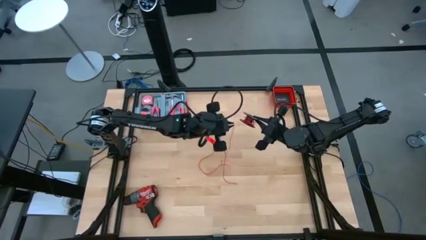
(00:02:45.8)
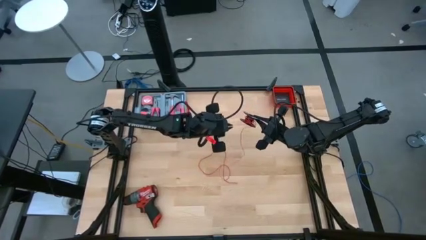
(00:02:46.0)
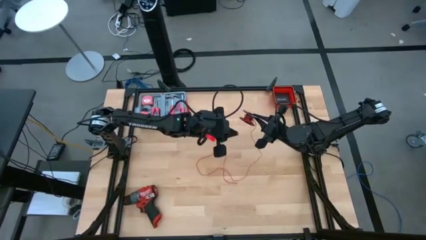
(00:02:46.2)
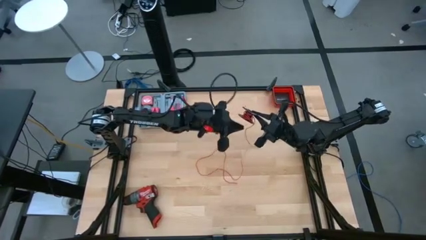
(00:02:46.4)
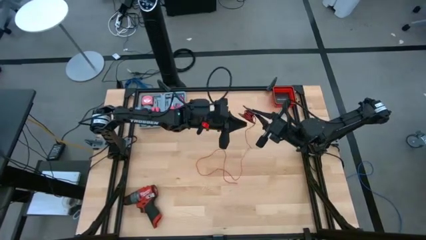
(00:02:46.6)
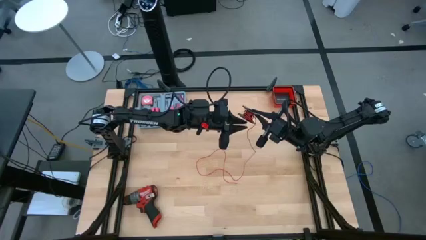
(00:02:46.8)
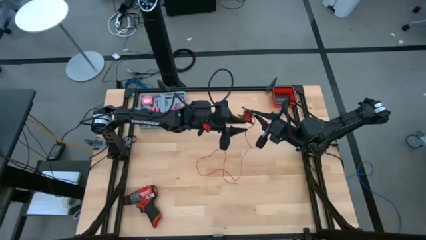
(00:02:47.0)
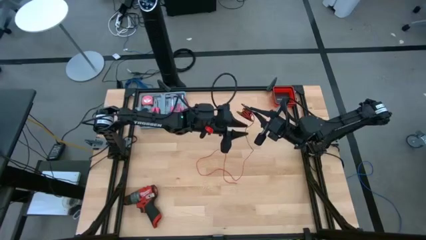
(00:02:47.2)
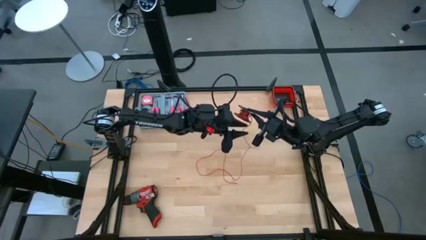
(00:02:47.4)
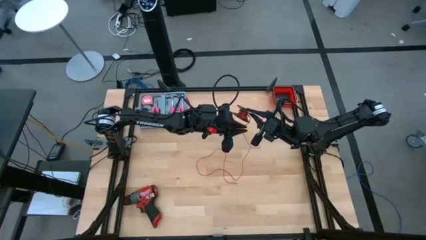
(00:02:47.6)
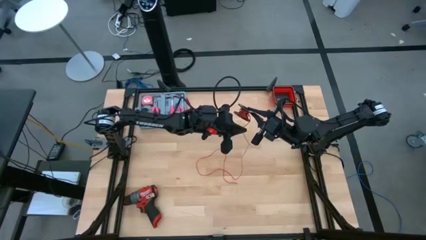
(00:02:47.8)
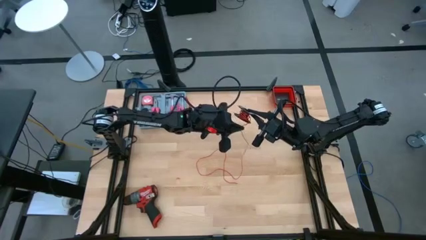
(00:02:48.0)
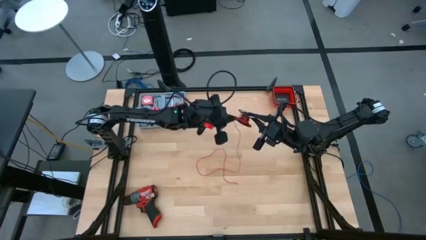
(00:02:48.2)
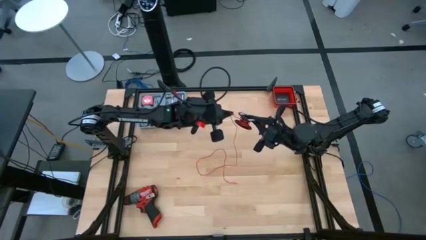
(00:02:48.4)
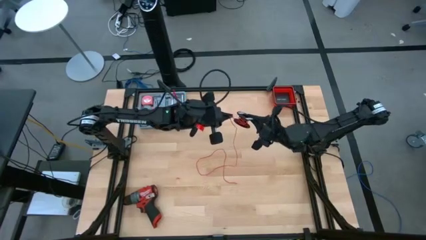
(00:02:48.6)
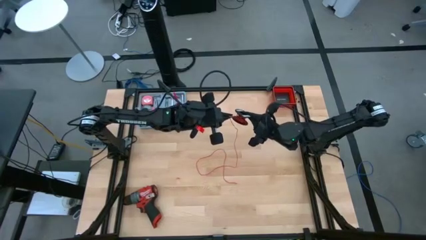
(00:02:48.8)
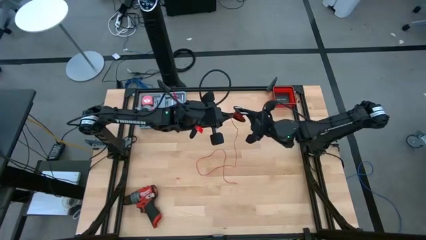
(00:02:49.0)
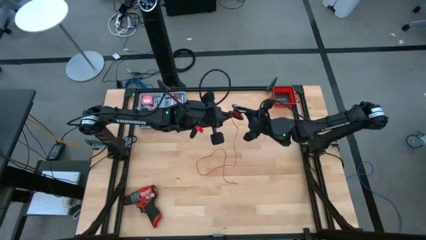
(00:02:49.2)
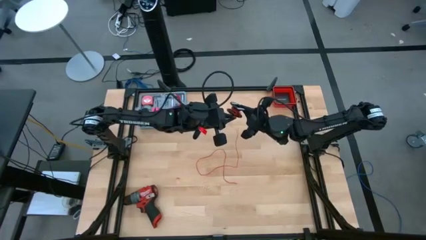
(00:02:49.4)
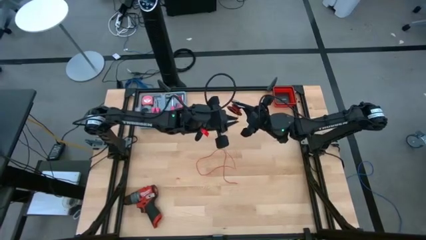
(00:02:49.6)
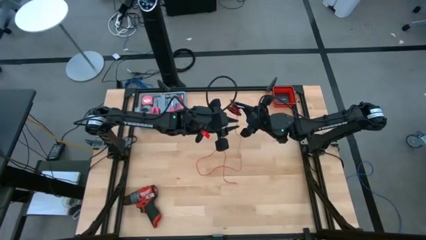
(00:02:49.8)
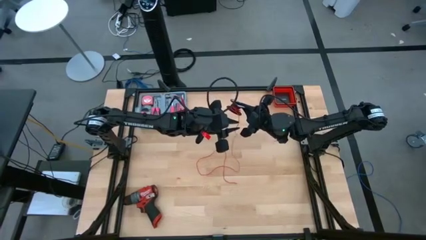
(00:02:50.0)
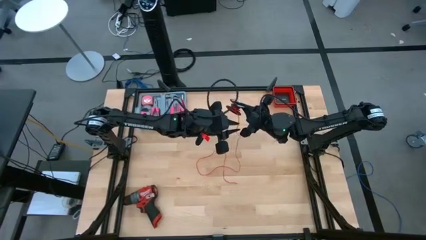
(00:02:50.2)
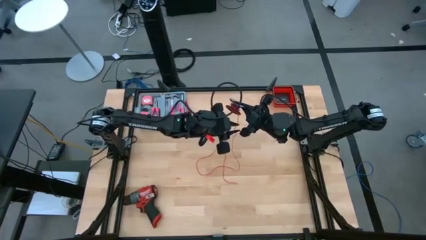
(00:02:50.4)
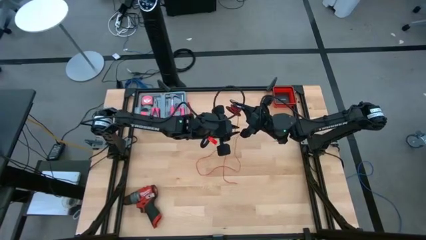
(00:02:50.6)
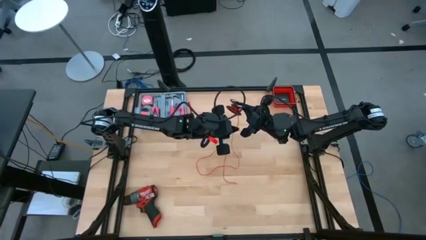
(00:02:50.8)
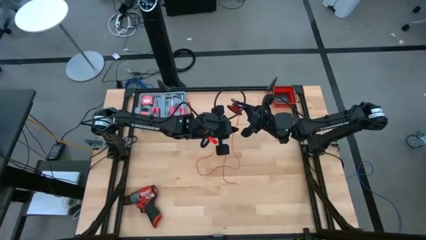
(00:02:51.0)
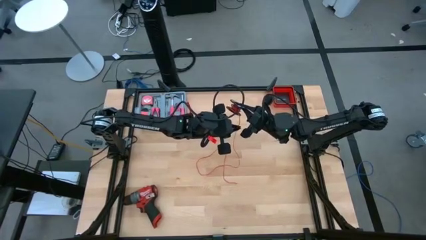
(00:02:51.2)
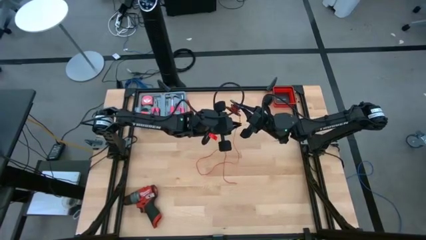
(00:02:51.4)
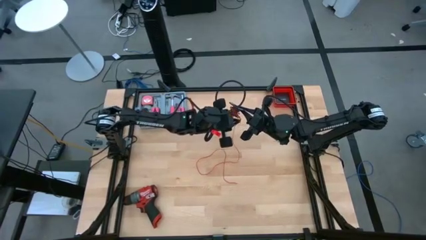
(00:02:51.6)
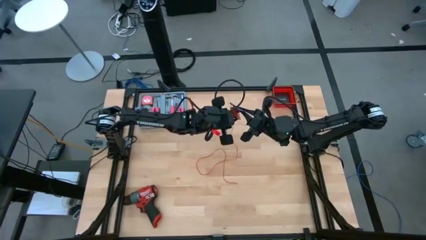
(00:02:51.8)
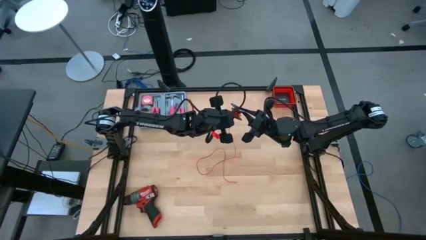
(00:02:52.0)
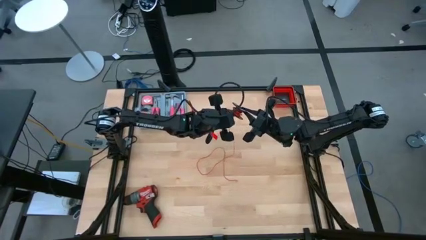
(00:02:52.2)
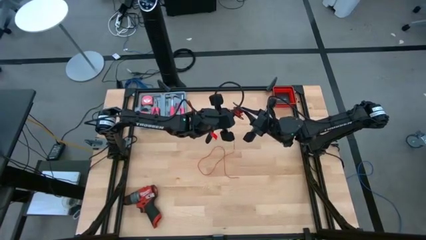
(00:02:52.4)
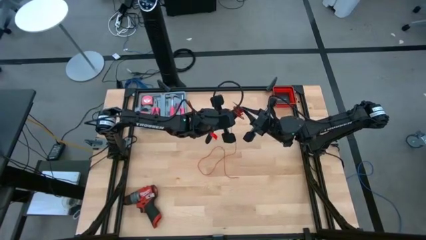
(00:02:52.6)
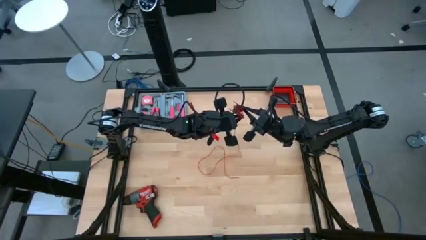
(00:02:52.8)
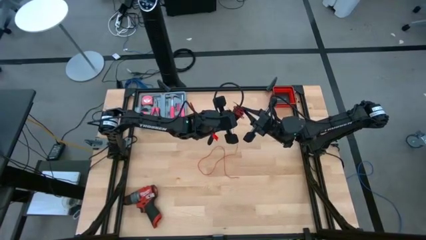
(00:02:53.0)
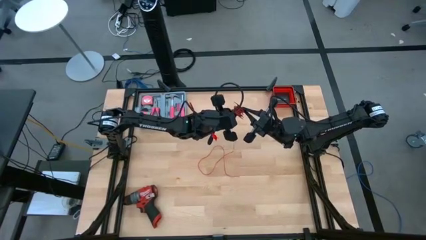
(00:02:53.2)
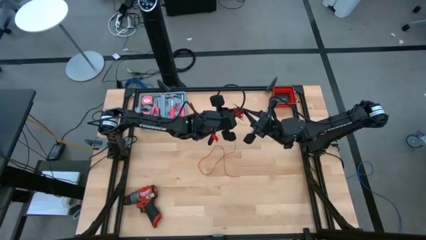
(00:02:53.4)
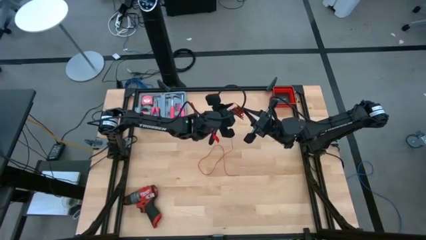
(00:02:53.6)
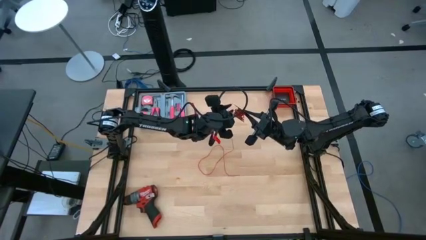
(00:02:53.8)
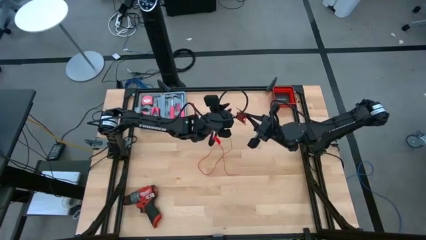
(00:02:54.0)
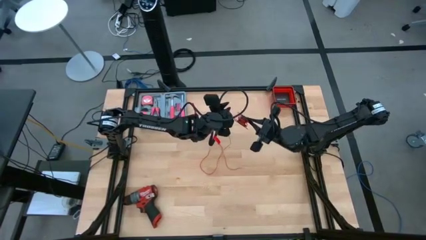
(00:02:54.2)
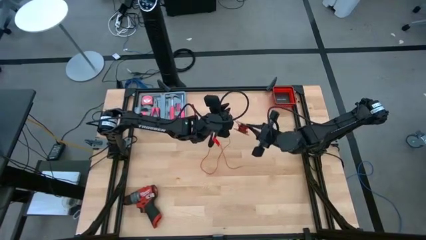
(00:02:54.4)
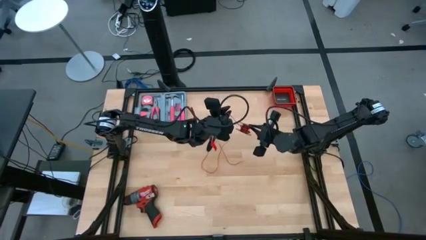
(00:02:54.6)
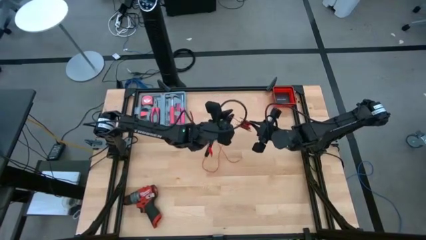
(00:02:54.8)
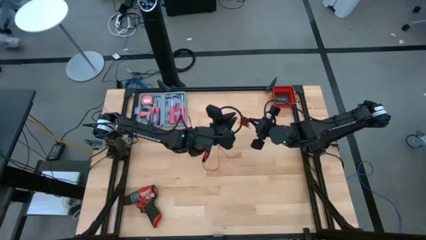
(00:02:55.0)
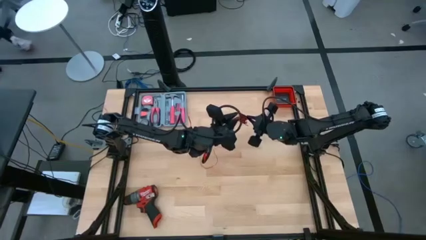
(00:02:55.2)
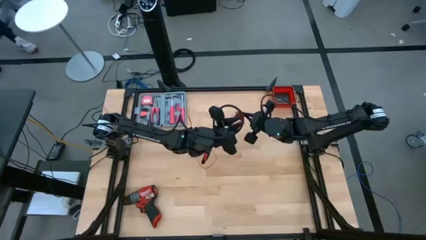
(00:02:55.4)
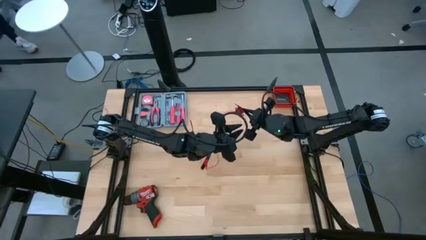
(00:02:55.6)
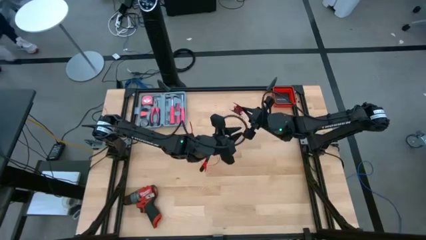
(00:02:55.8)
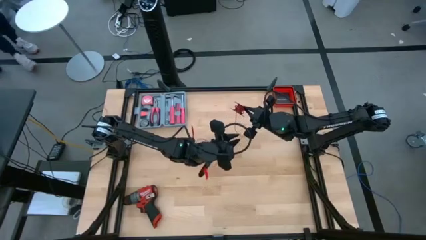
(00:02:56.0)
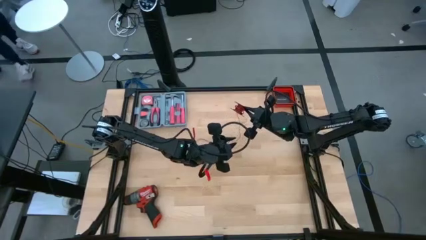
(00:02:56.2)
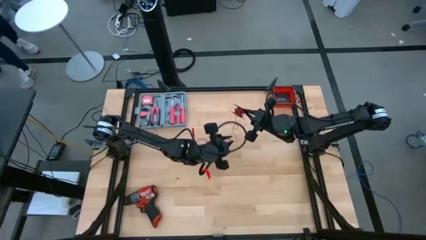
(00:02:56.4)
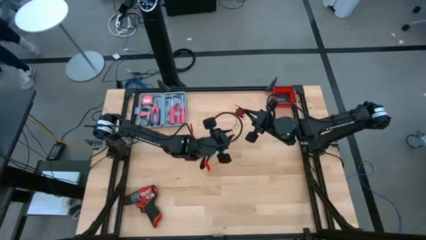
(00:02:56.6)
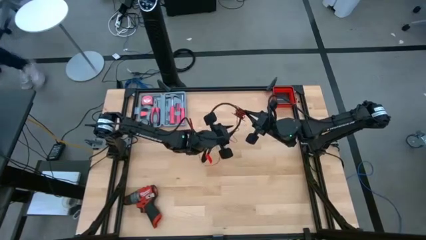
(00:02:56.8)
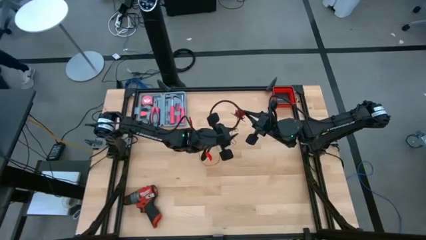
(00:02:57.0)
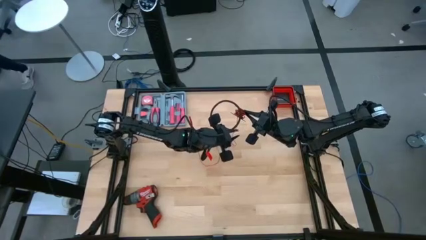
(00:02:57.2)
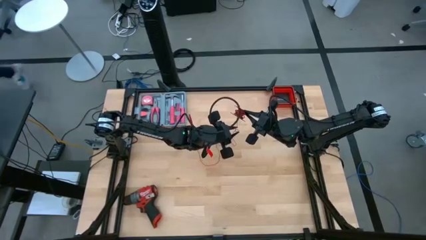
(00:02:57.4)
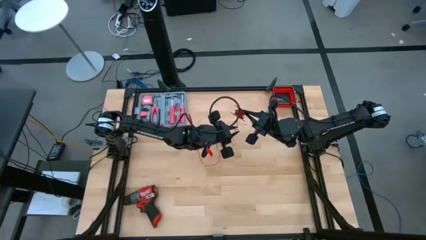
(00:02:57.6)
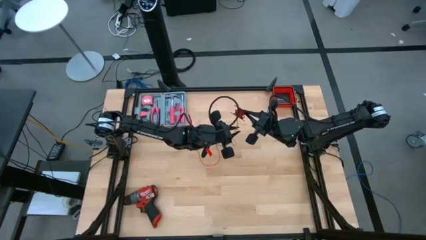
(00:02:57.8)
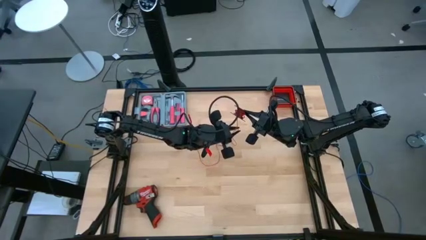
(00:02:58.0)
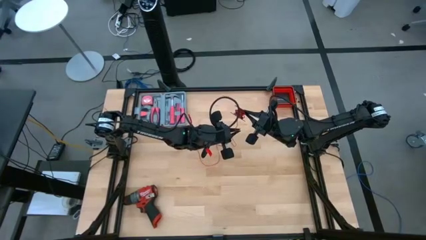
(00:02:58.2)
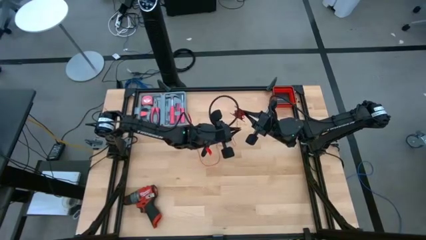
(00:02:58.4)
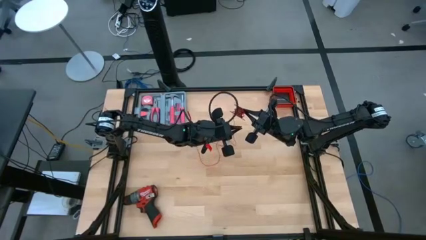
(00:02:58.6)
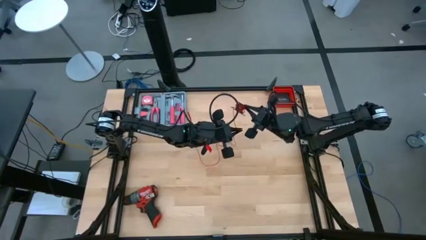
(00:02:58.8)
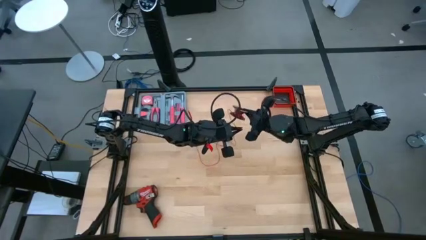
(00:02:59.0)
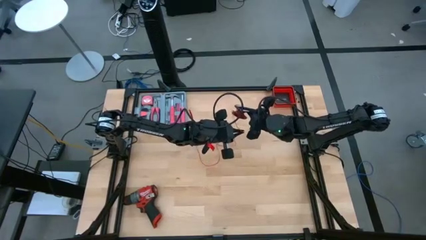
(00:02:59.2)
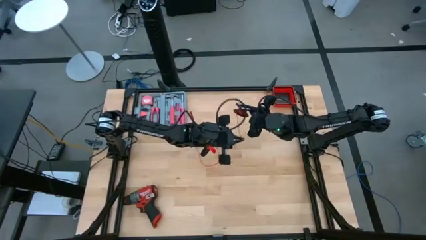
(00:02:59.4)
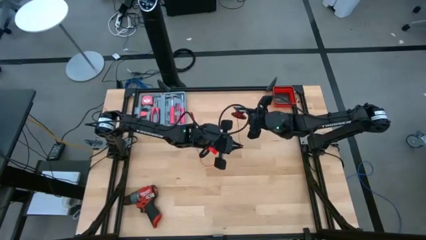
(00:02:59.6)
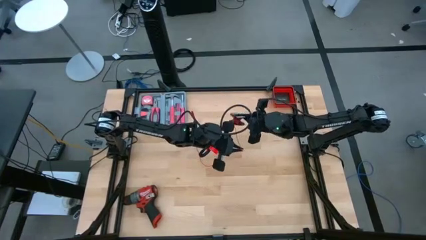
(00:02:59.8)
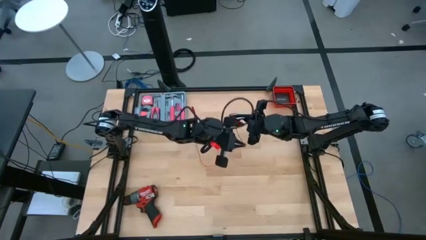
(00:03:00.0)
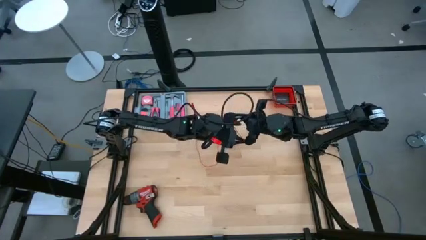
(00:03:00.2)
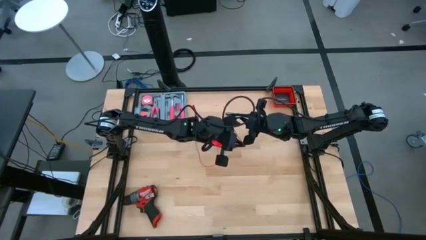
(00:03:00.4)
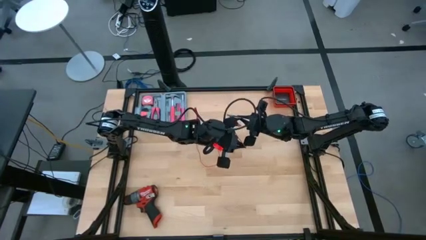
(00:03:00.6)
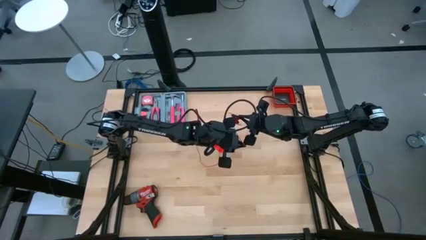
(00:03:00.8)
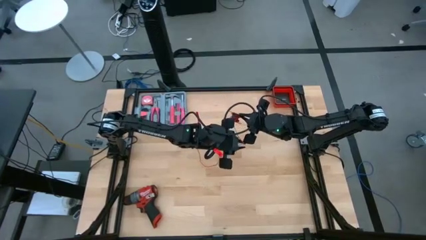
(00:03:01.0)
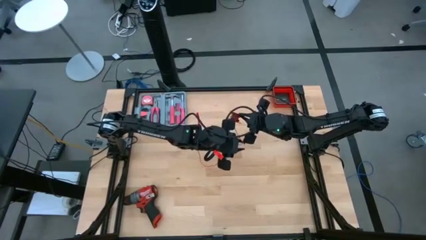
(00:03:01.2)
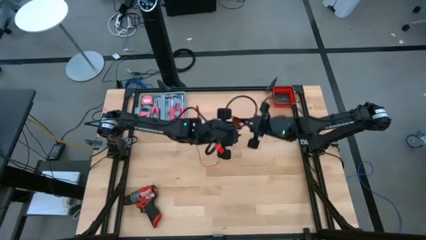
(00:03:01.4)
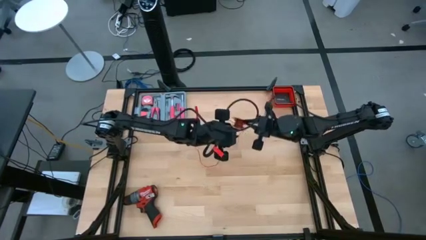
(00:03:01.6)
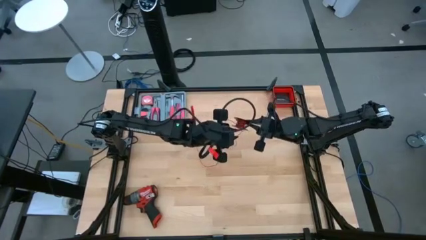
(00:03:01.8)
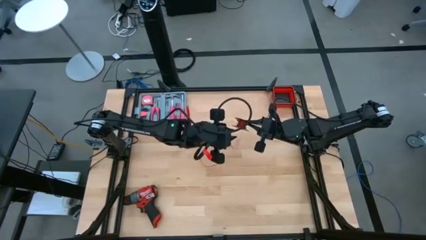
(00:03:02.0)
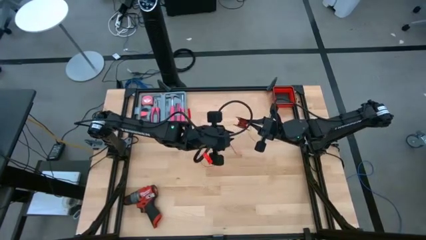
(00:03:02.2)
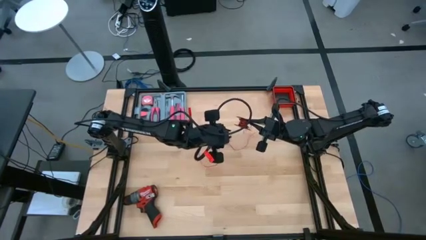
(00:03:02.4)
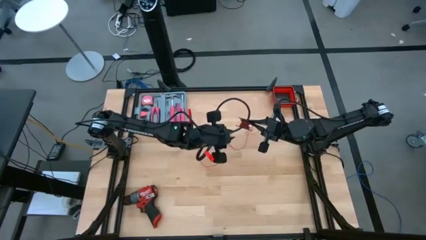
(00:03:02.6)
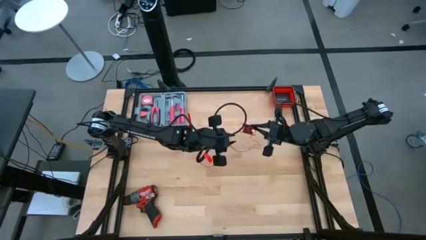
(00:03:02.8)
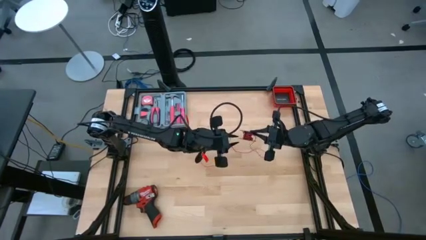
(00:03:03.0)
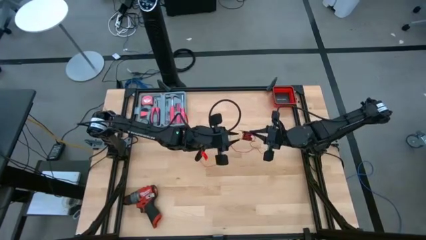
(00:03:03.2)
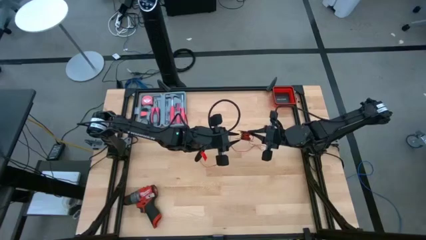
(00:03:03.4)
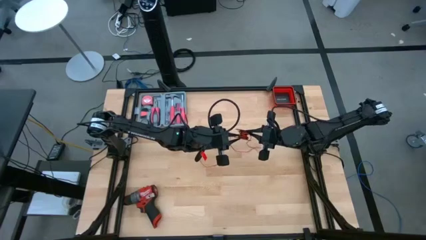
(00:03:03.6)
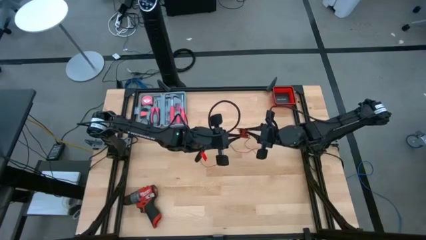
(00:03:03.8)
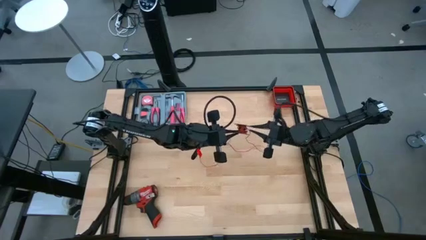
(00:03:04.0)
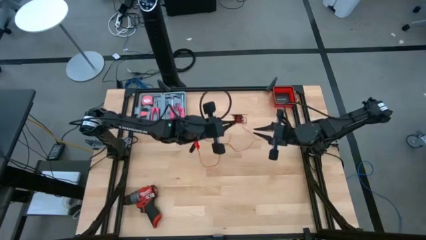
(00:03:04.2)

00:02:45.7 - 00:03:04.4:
Task: Coil cords
Coil the red wire on the black spool
